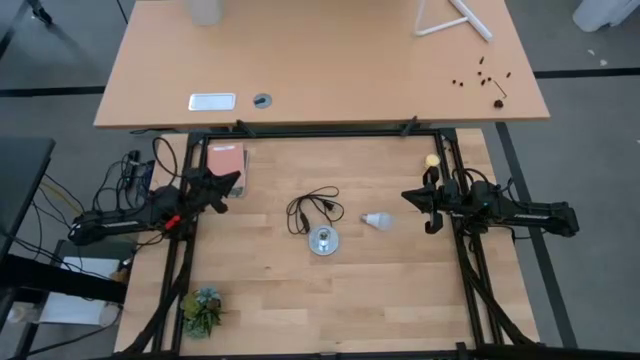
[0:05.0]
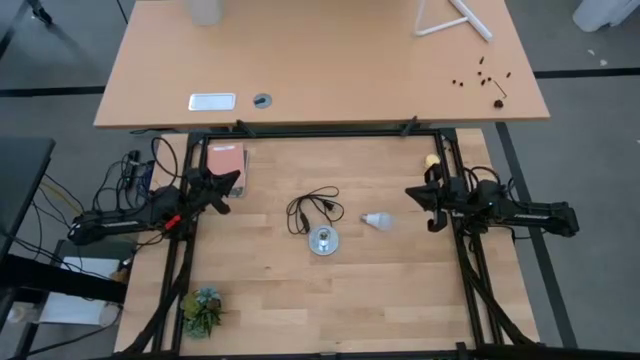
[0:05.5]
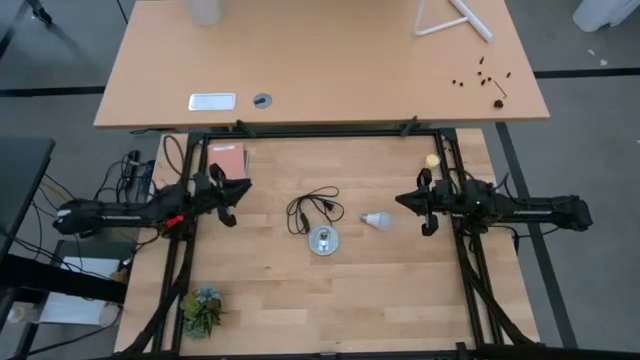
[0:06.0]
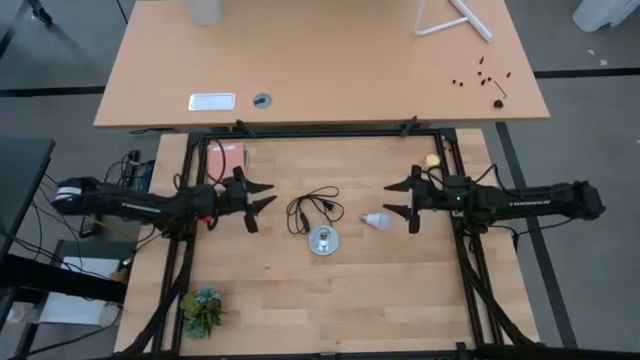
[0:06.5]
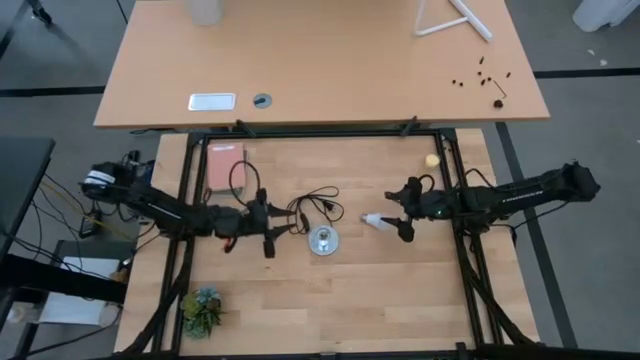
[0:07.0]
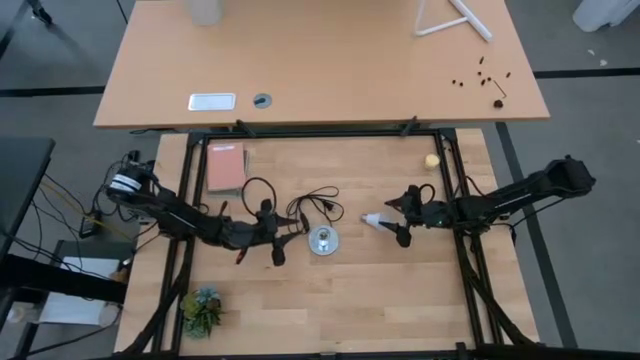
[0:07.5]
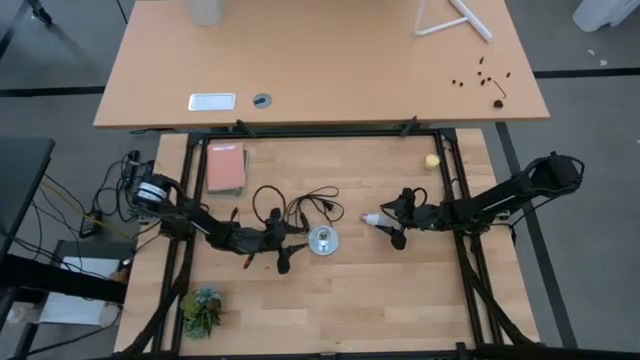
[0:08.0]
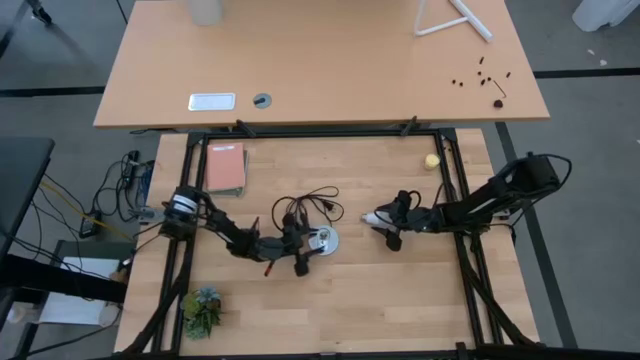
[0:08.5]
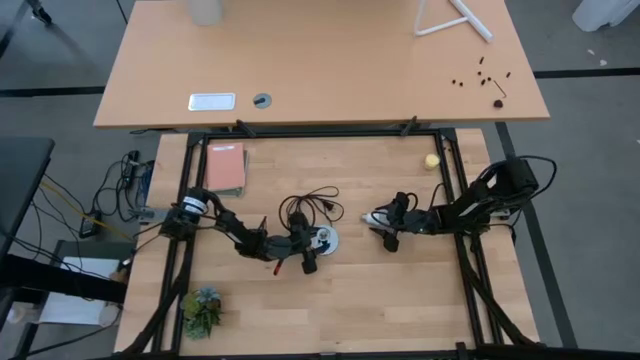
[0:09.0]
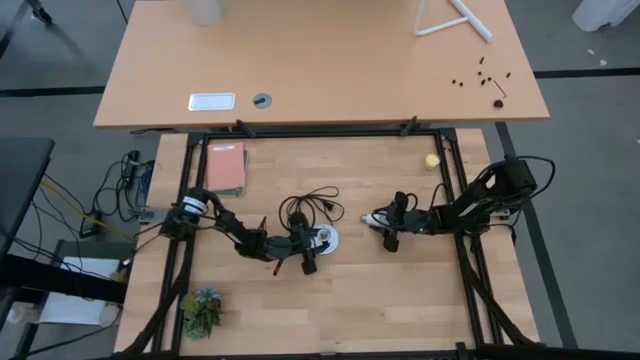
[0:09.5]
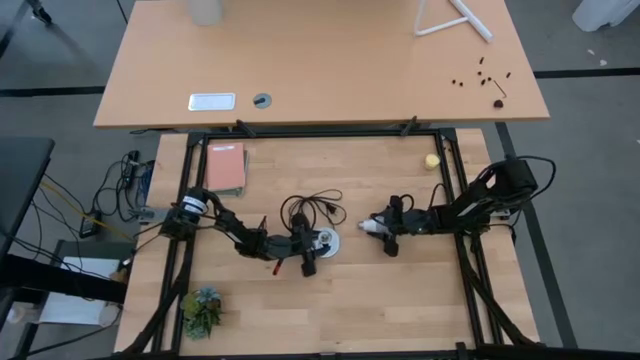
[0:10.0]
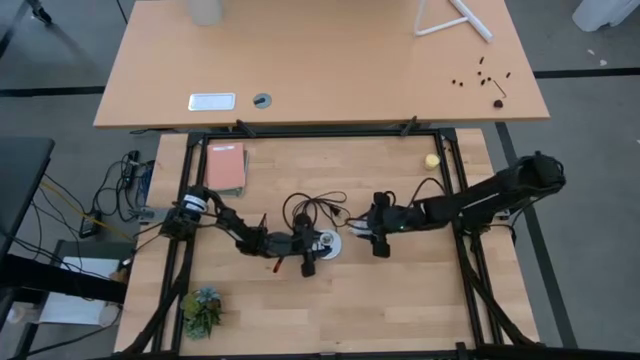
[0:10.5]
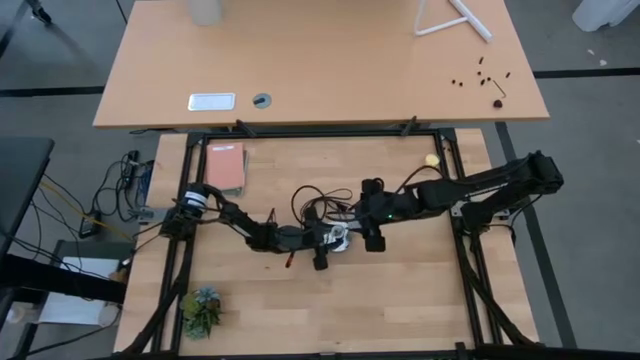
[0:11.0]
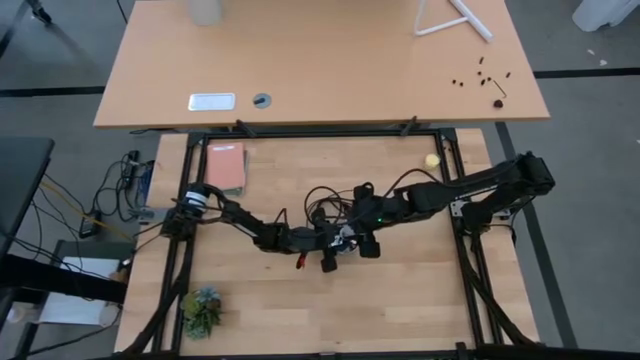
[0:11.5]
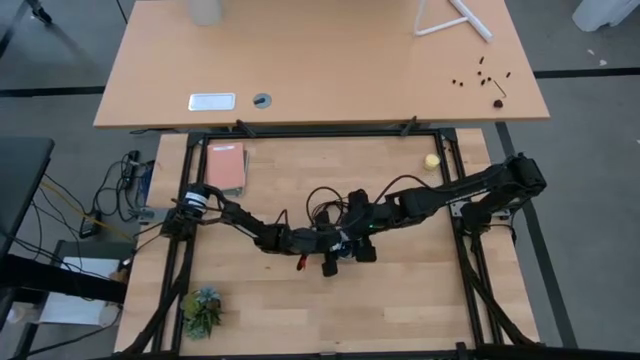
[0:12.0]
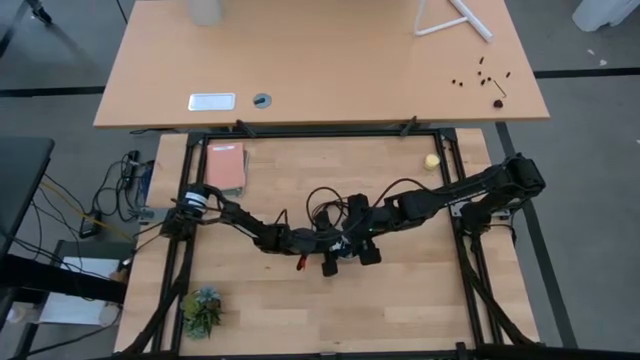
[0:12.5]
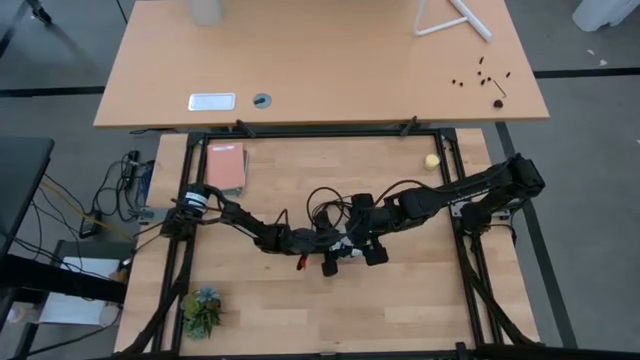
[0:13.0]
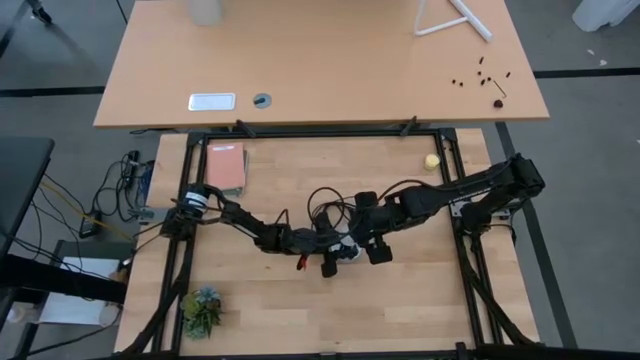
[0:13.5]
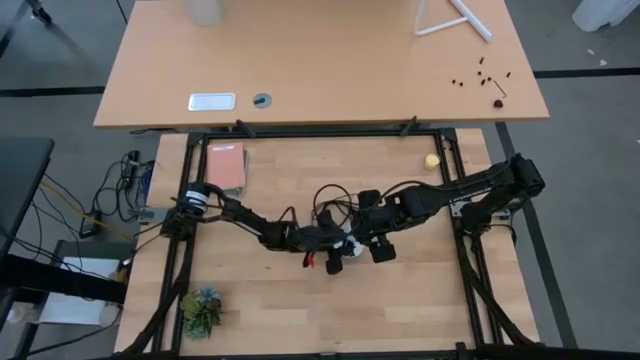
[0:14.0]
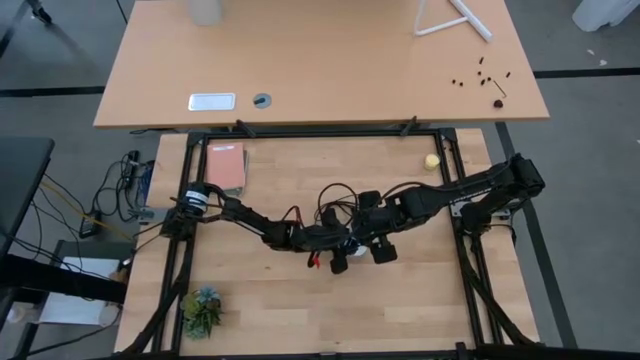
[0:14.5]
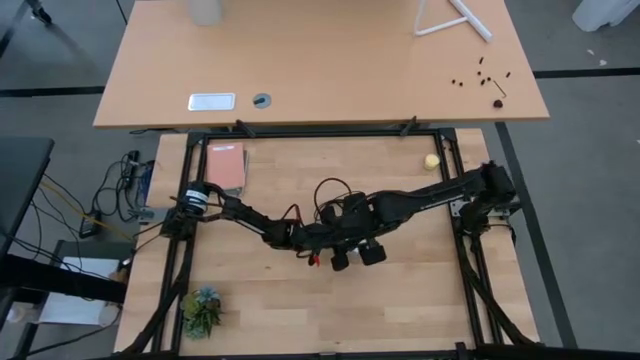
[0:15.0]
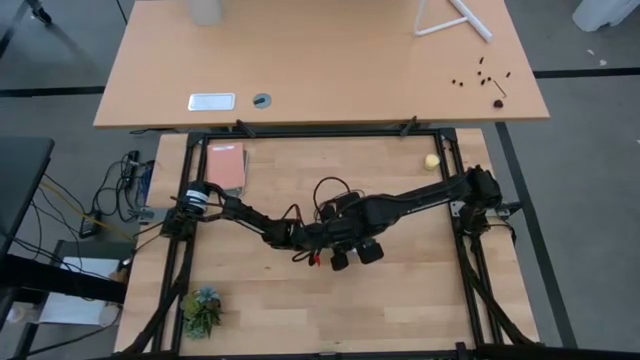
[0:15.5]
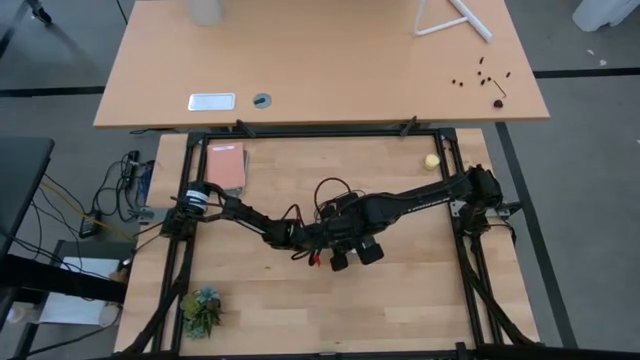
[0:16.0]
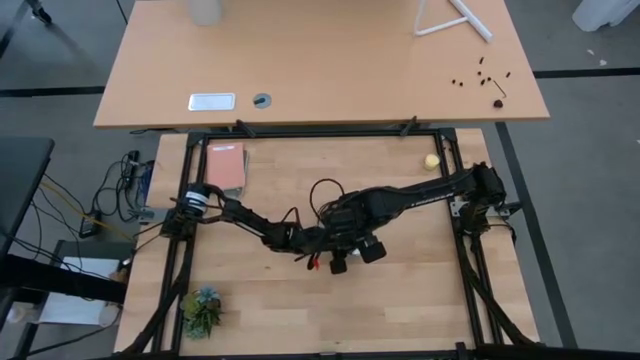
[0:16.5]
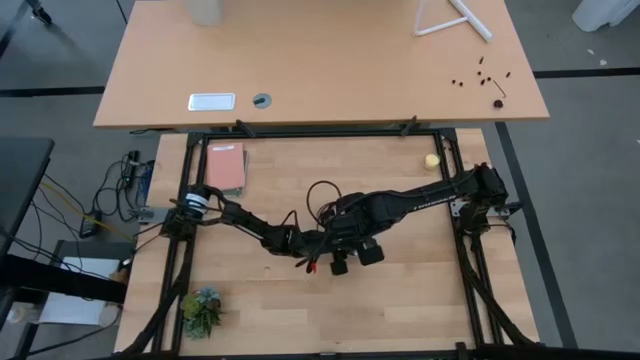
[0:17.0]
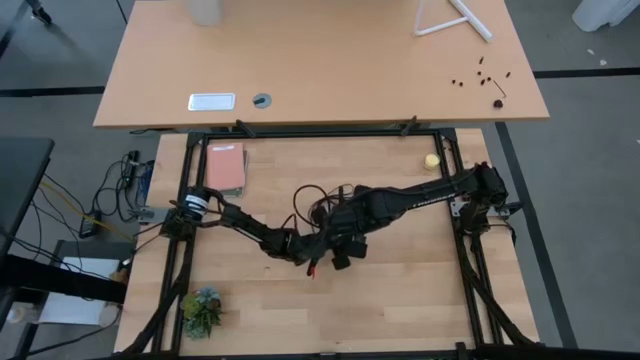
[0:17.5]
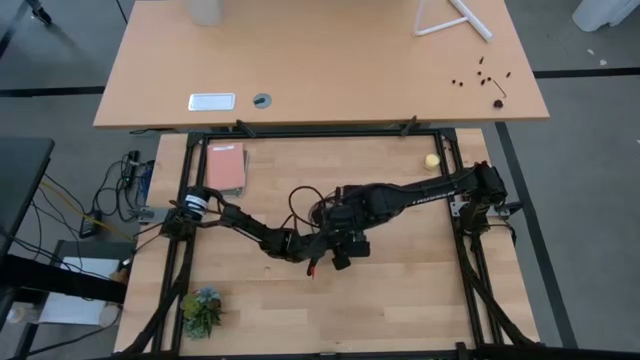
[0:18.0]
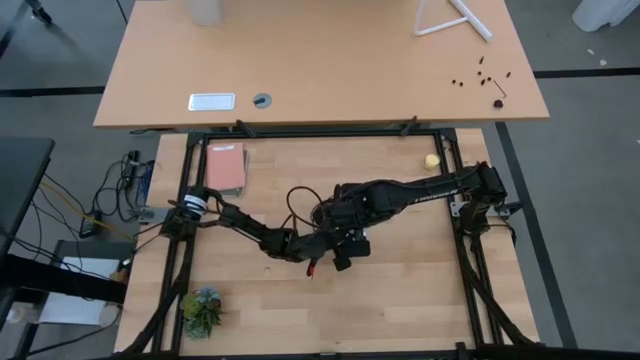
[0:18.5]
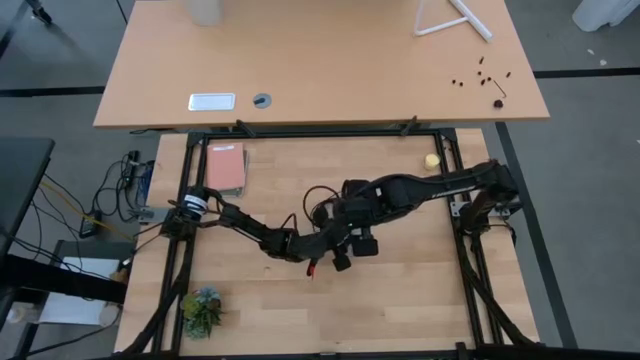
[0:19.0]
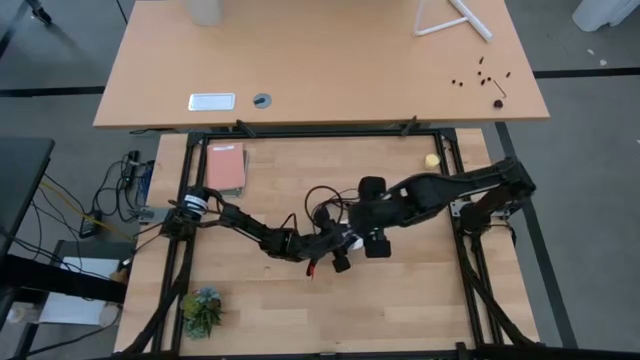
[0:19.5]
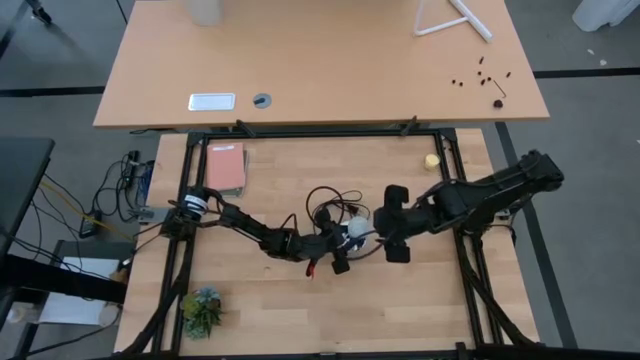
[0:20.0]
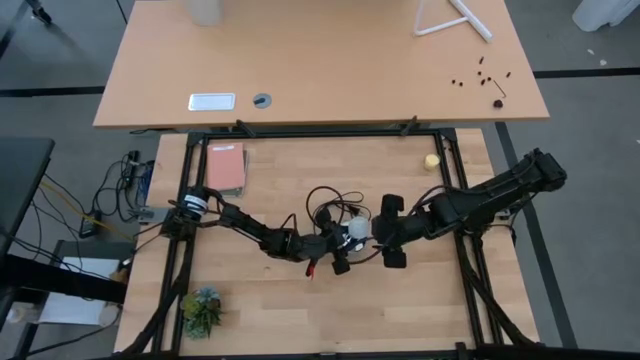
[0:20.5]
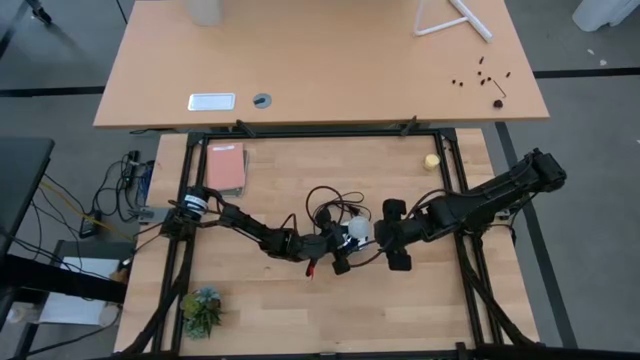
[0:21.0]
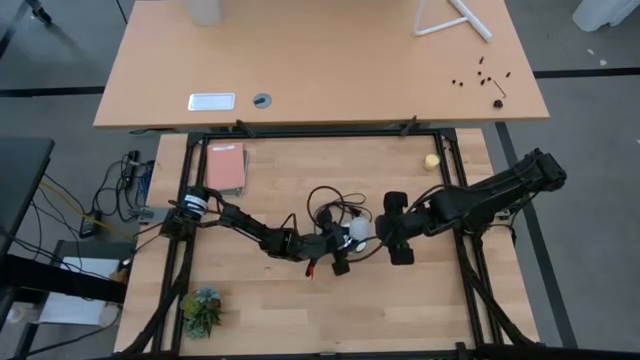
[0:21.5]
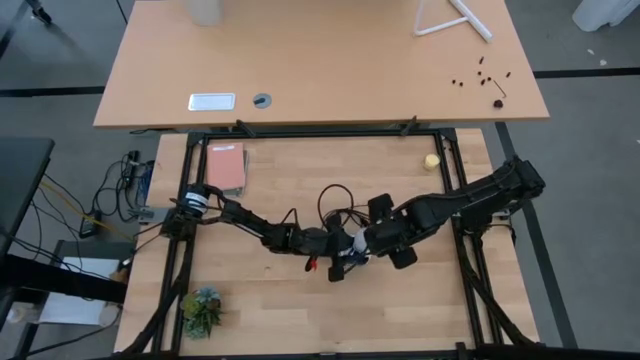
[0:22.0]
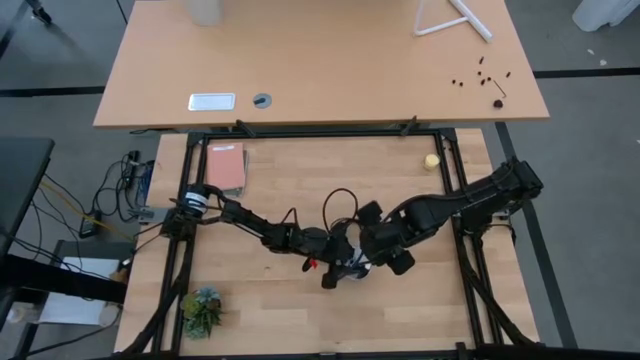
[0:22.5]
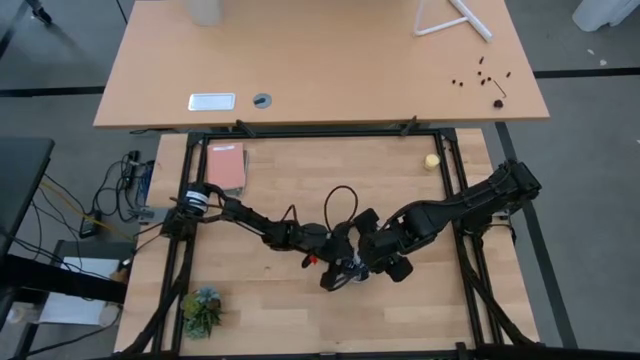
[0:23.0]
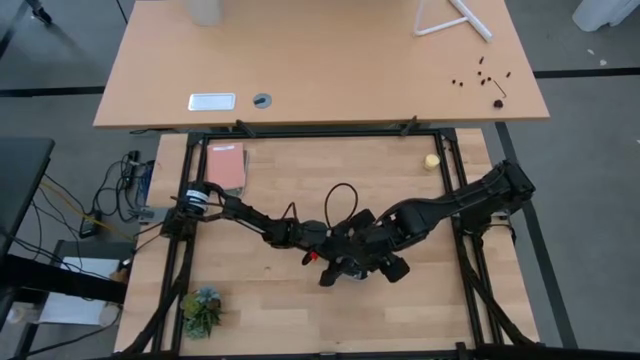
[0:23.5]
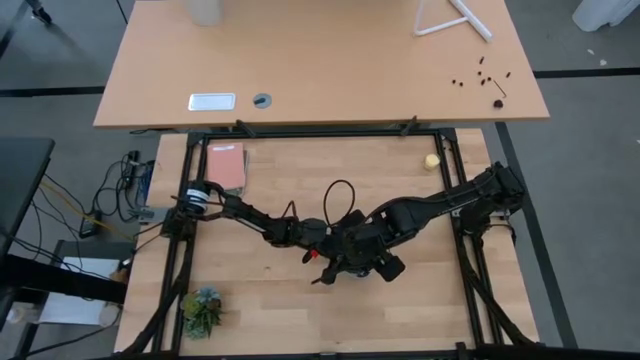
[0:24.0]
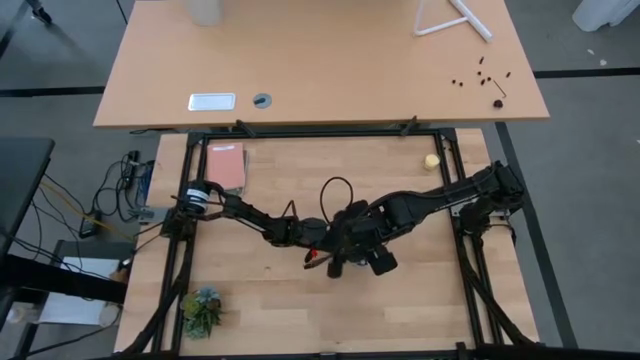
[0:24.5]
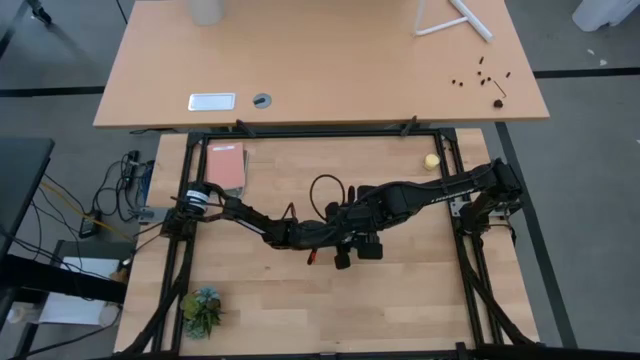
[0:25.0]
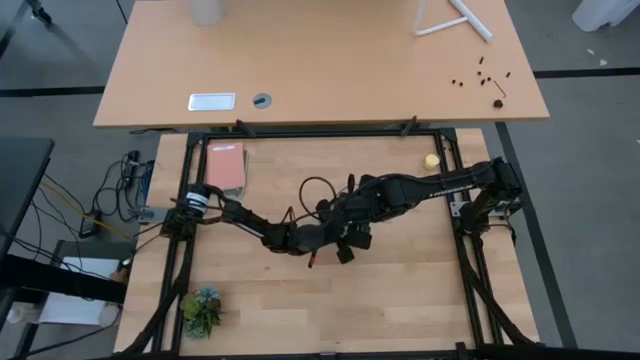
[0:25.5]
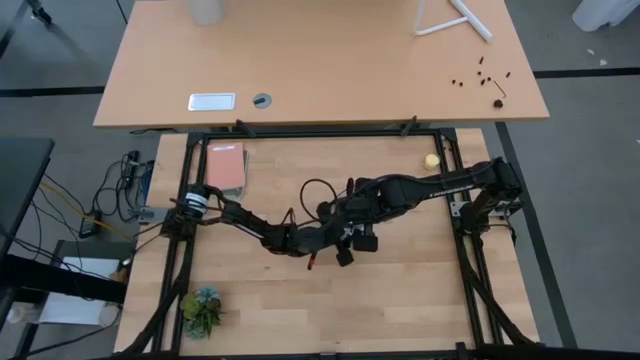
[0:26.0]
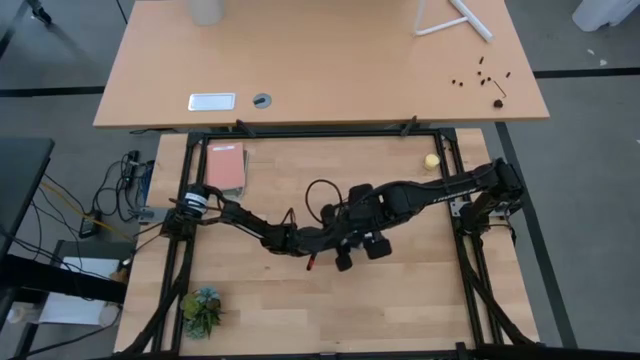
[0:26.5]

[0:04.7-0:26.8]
Task: Screw lightbulb
Insert the lightbulb into the lamp
